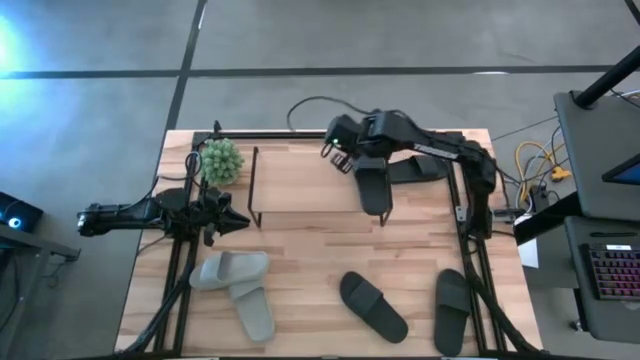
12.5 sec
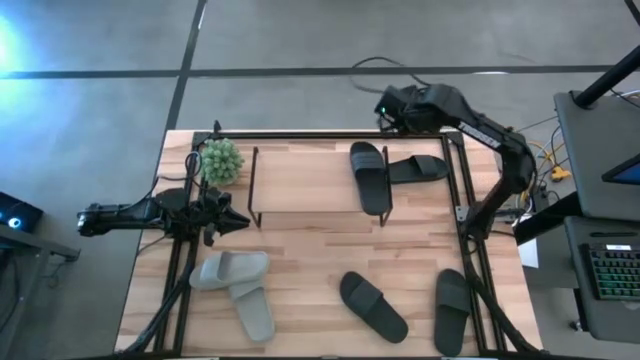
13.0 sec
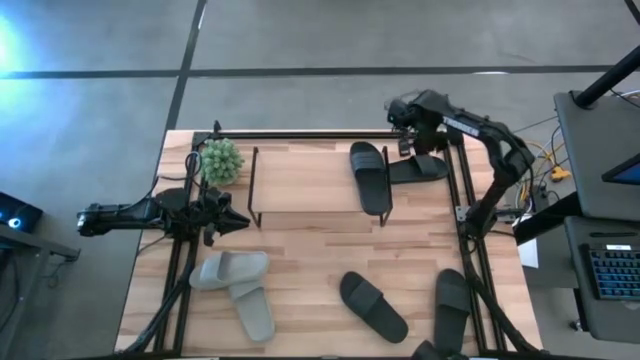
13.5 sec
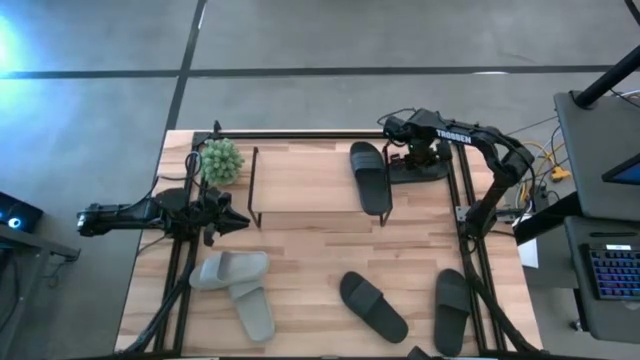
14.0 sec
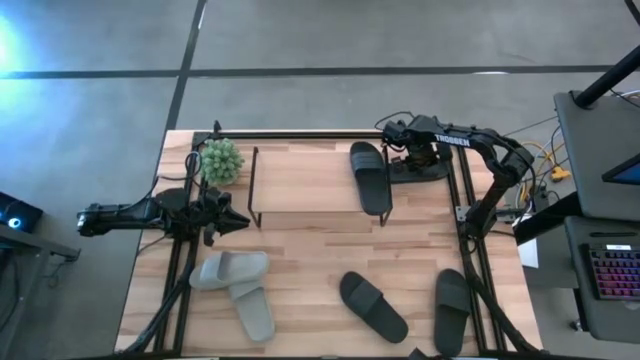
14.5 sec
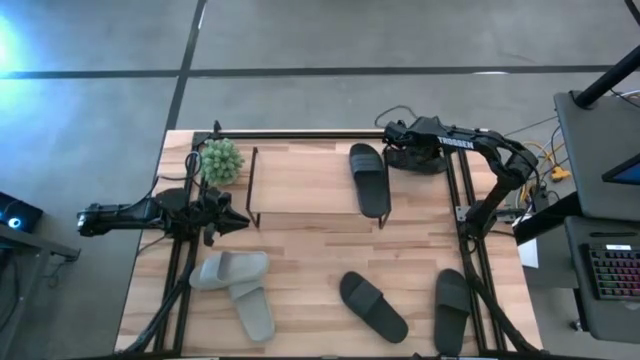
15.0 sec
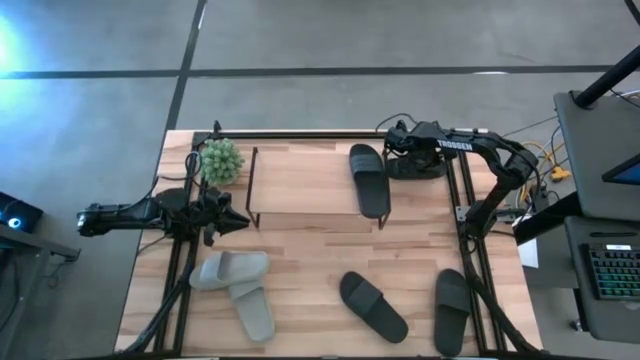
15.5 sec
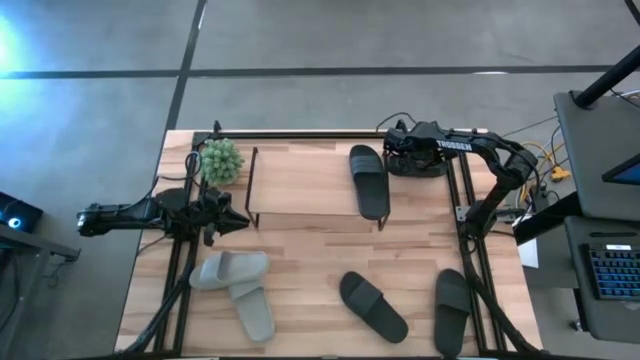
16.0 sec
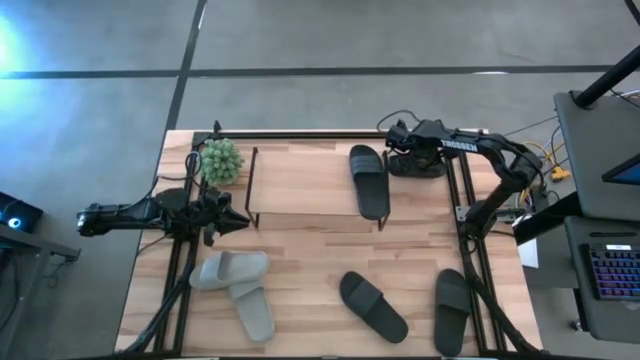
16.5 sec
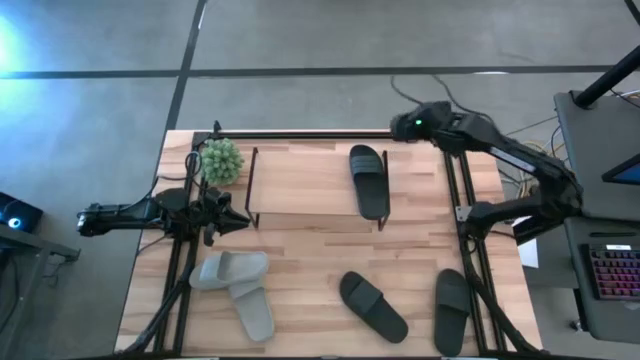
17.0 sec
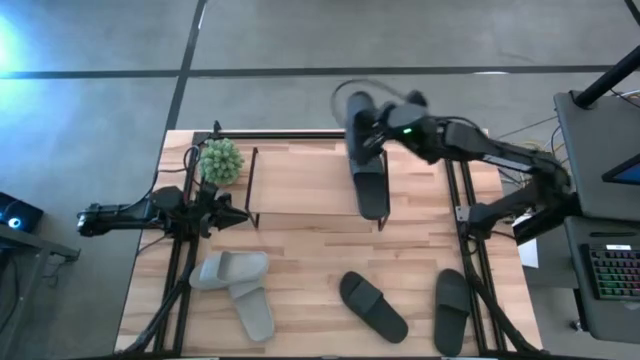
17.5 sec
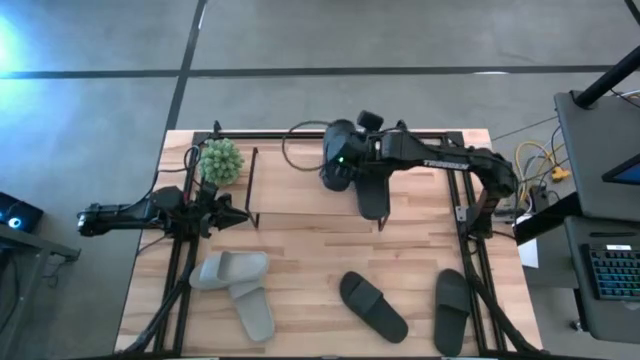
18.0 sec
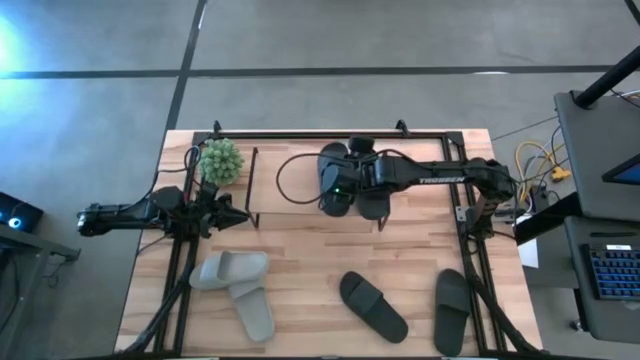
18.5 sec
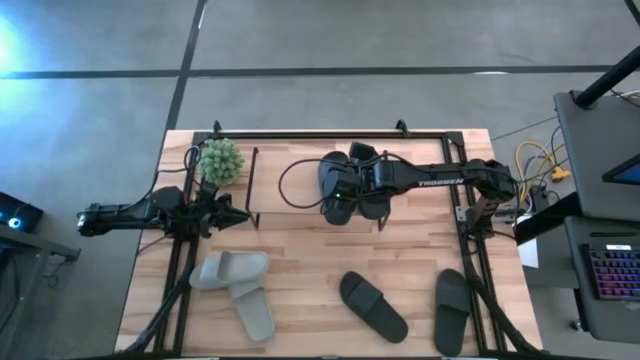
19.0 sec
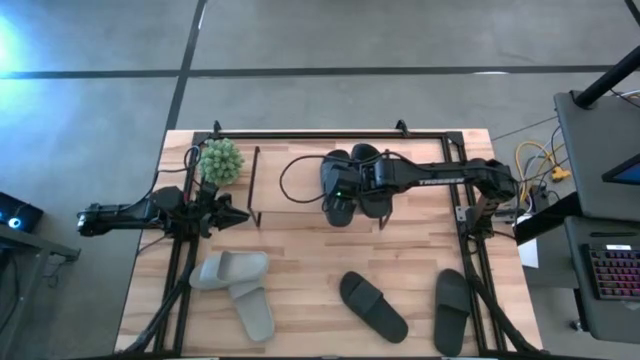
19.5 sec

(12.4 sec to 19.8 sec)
Task: Pick and place slides into the shelf
Put the black slipper on the shelf

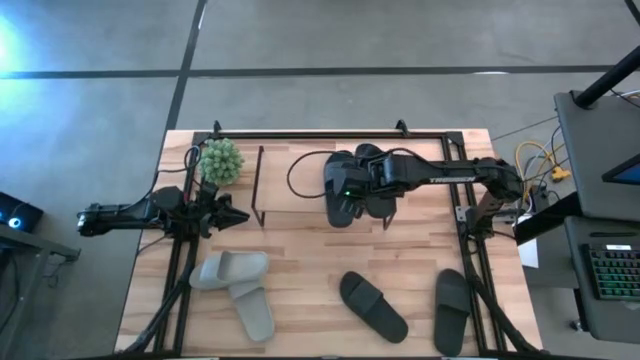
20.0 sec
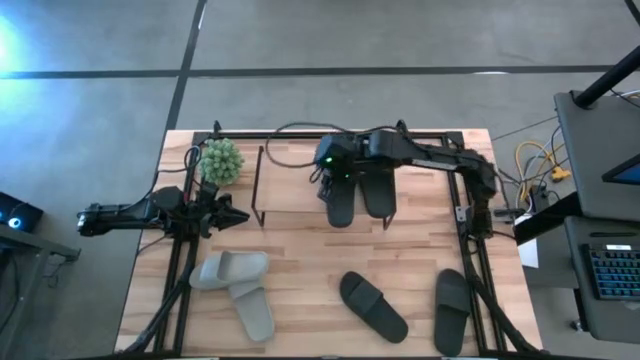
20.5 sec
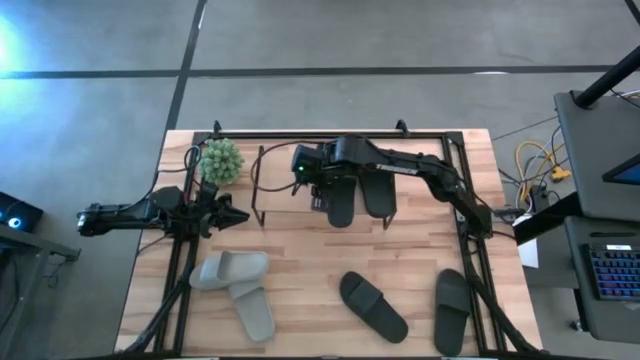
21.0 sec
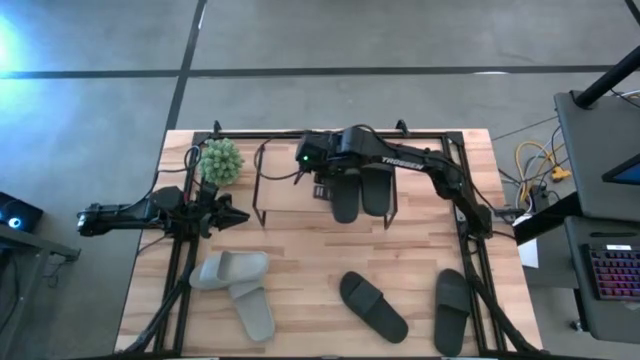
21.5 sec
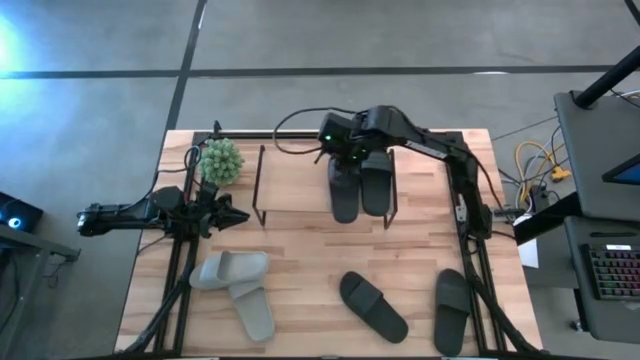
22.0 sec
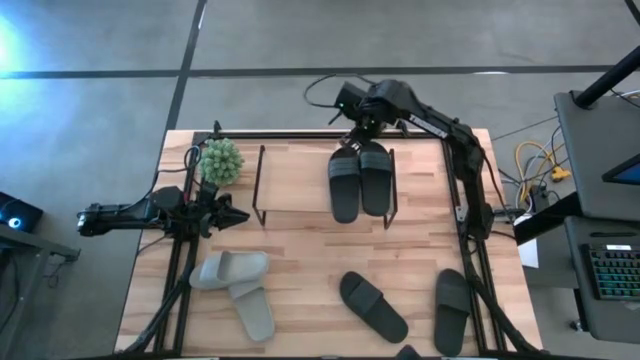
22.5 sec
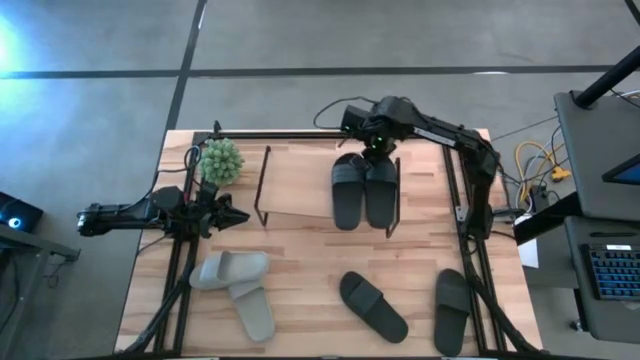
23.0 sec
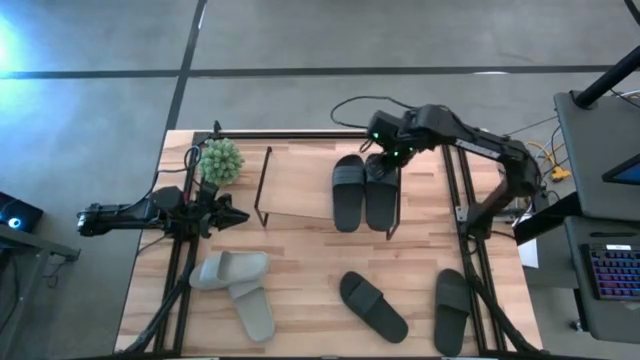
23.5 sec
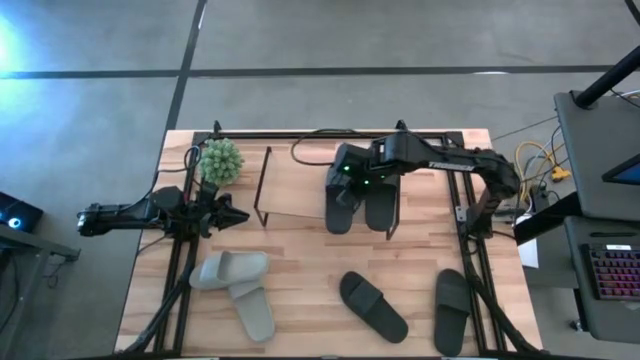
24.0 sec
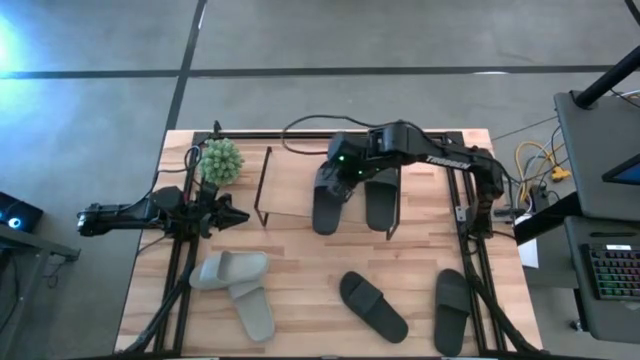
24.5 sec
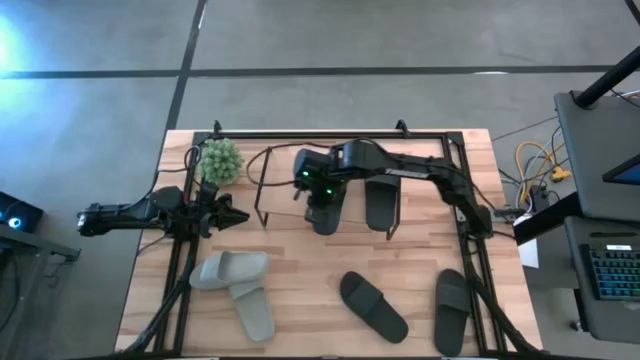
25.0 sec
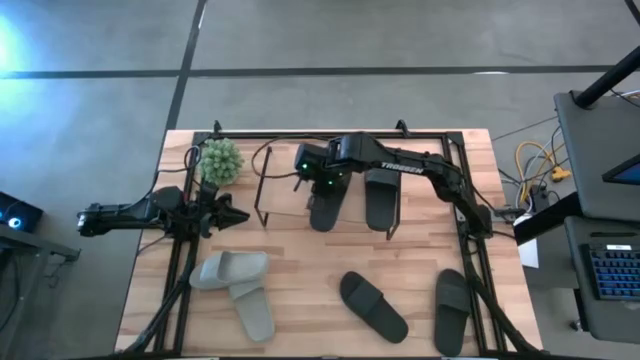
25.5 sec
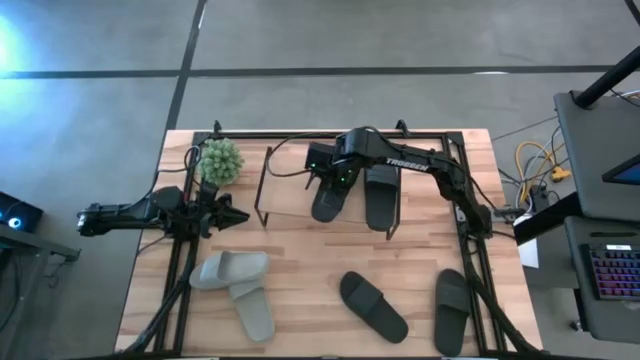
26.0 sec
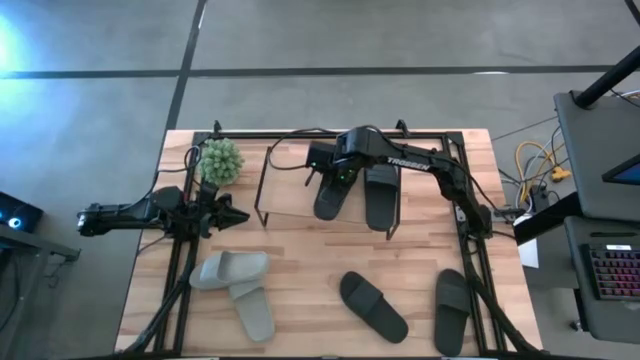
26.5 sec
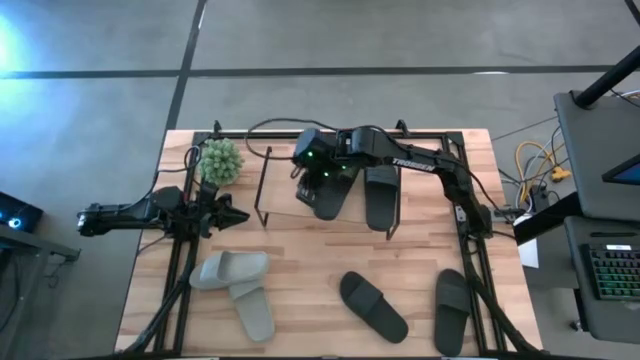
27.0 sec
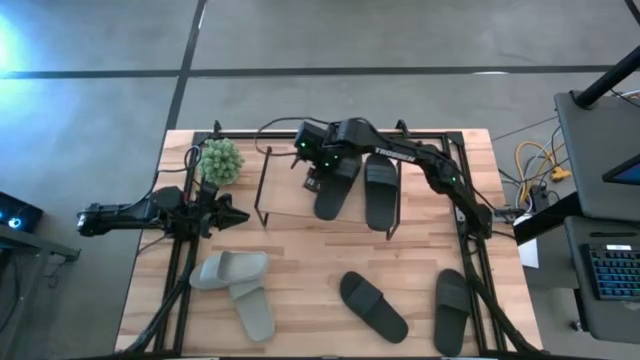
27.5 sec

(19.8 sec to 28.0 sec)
Adjust the black slippers on the shelf

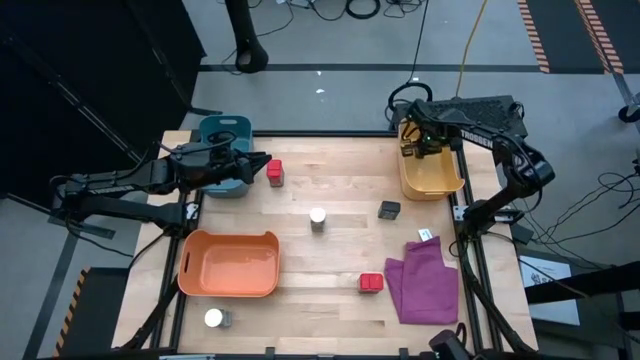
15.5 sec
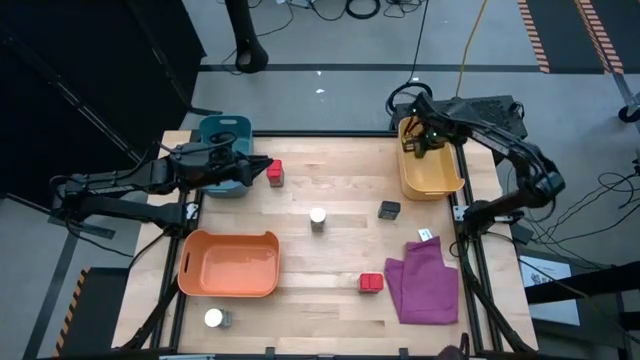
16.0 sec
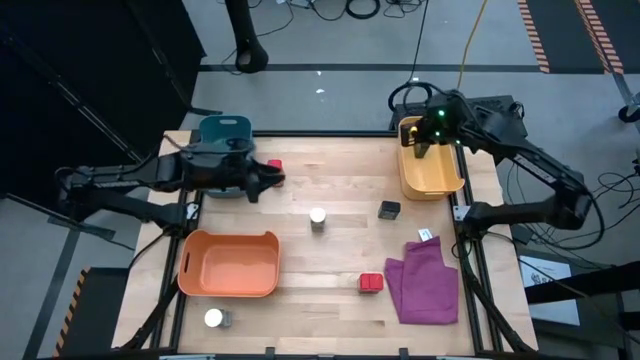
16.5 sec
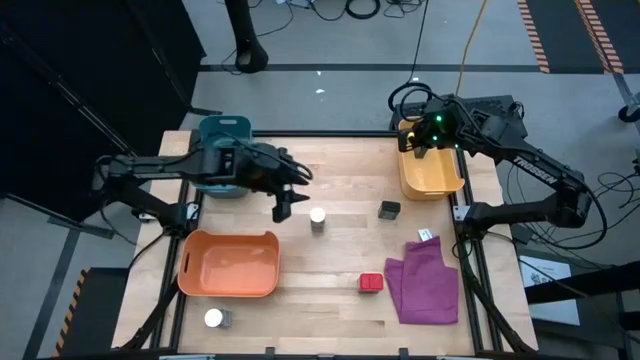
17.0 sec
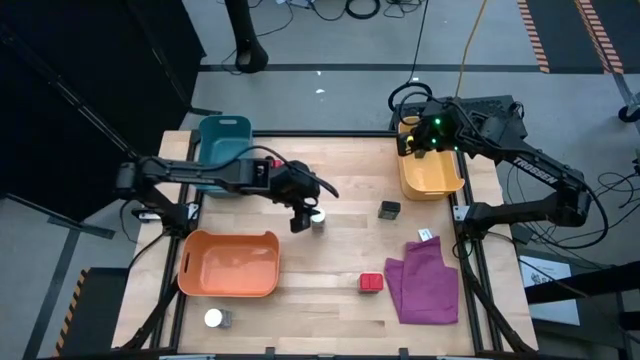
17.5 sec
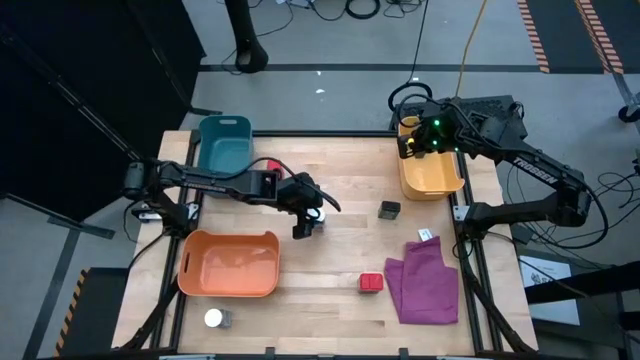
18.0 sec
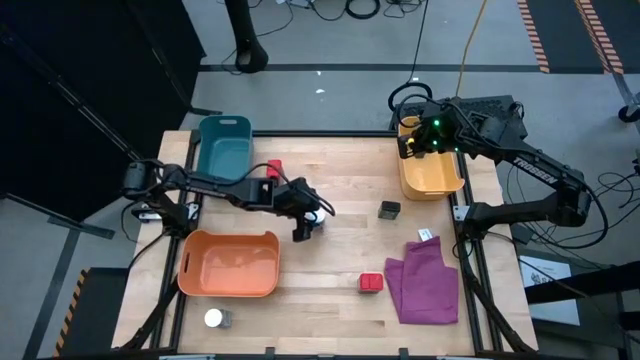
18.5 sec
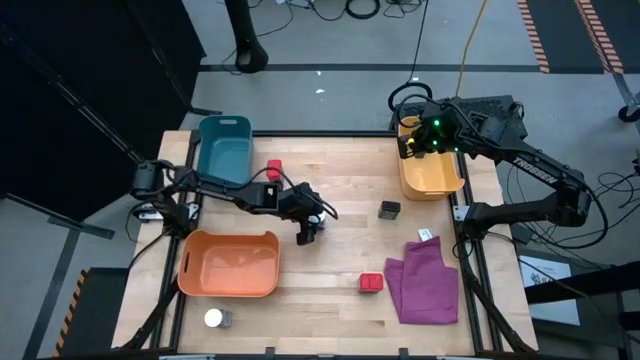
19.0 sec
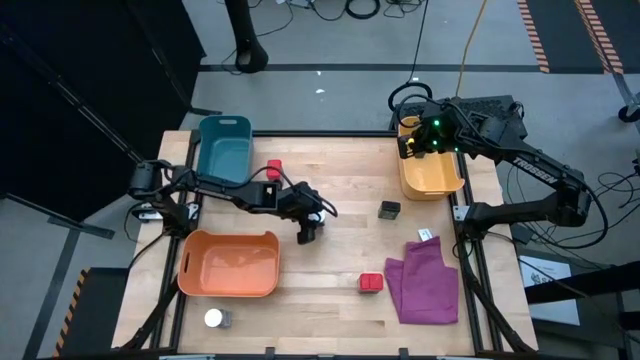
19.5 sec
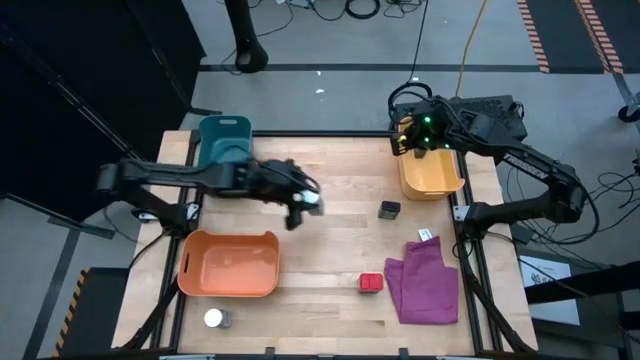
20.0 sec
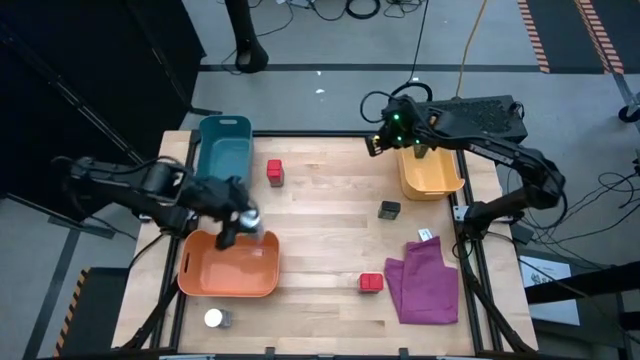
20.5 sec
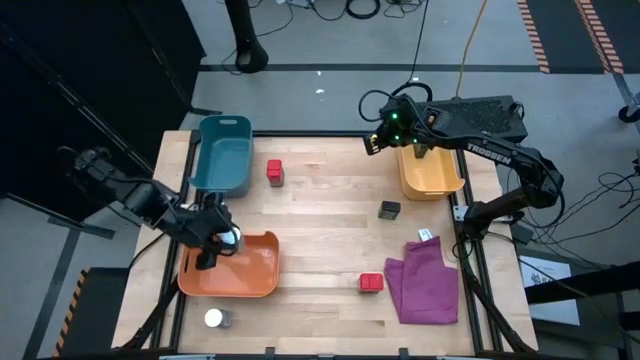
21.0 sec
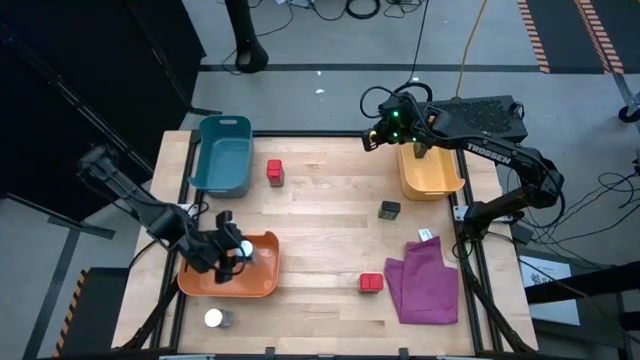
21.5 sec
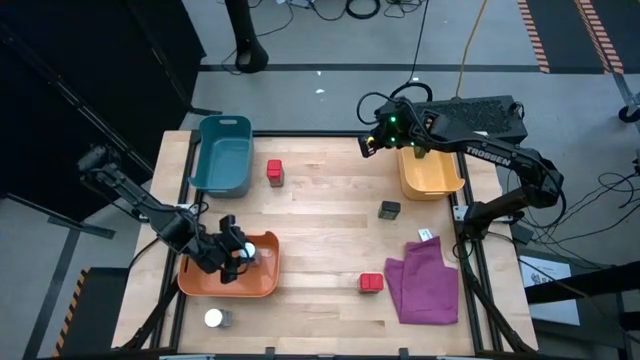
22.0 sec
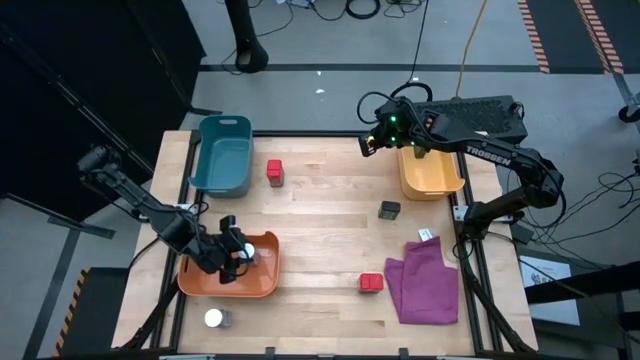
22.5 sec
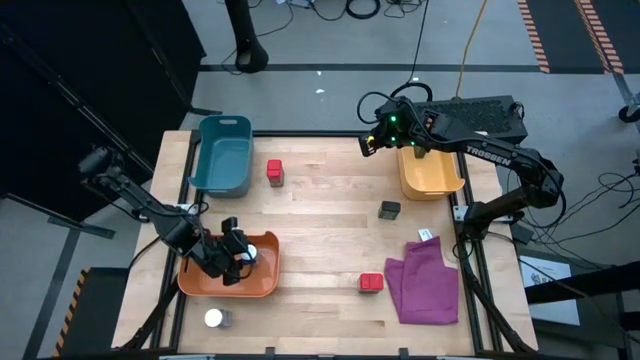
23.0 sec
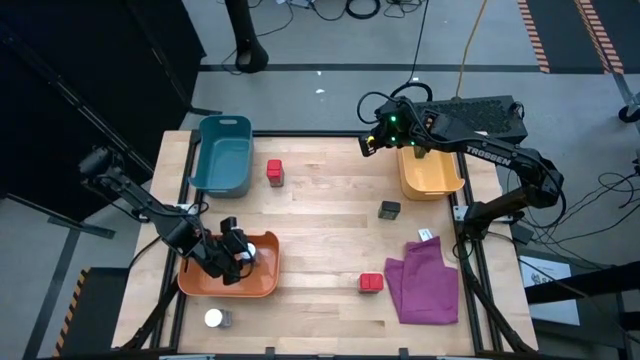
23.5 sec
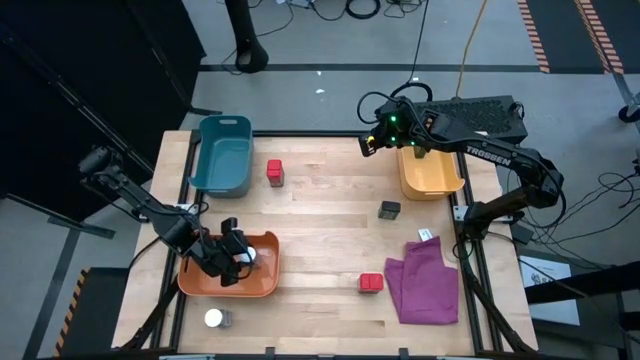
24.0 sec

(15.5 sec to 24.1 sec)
Task: Sort spices by type
Put the top white seasoning bottle into the orange bin
